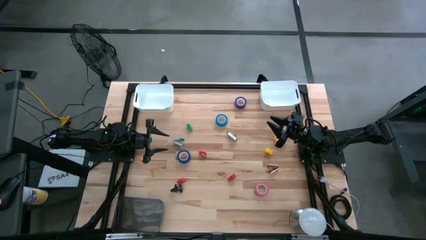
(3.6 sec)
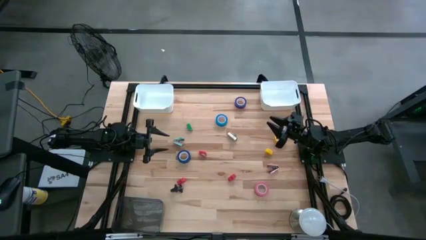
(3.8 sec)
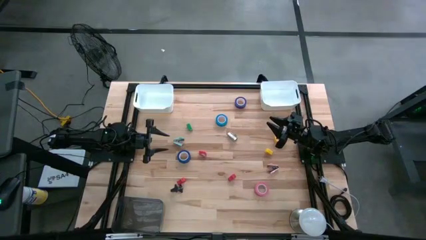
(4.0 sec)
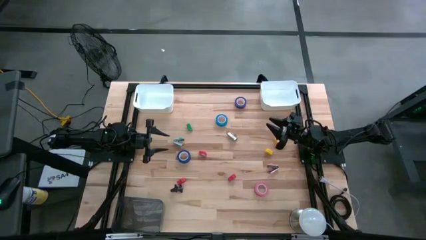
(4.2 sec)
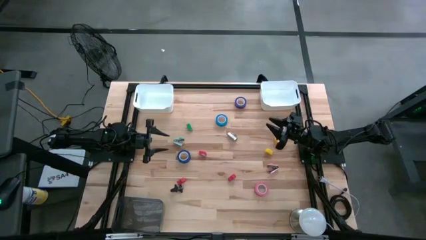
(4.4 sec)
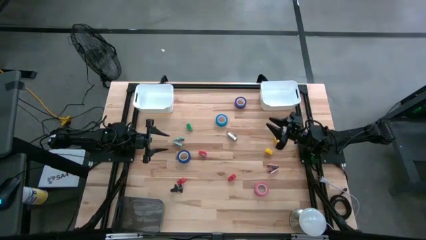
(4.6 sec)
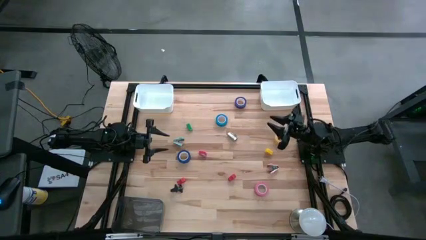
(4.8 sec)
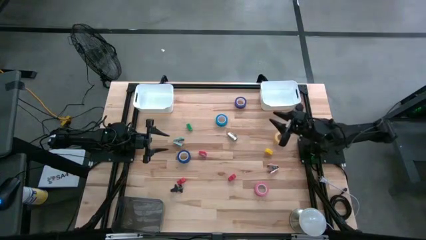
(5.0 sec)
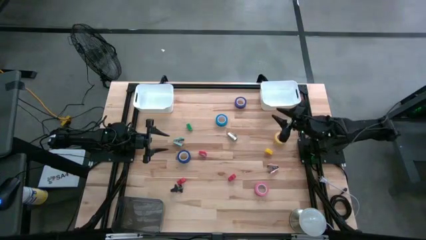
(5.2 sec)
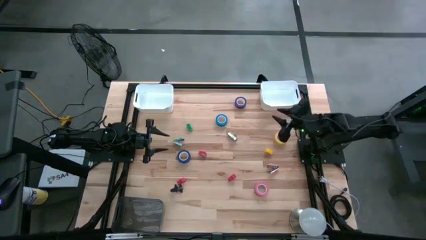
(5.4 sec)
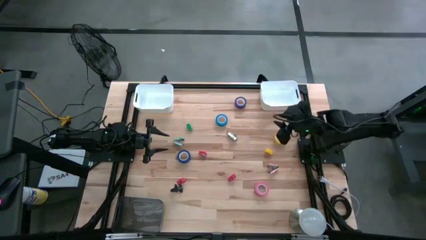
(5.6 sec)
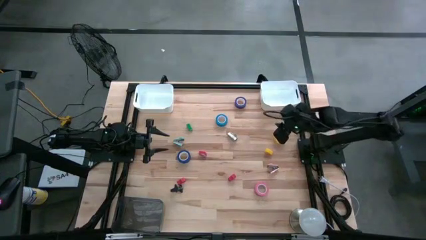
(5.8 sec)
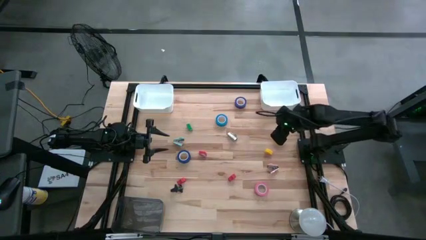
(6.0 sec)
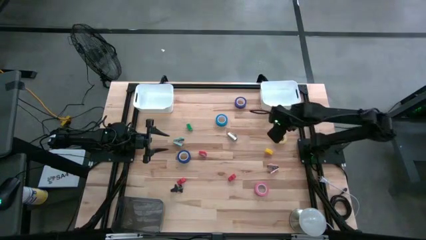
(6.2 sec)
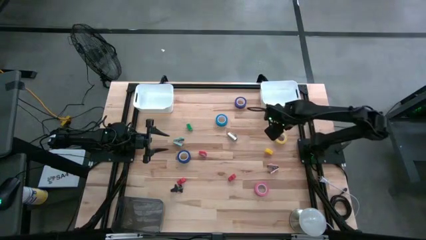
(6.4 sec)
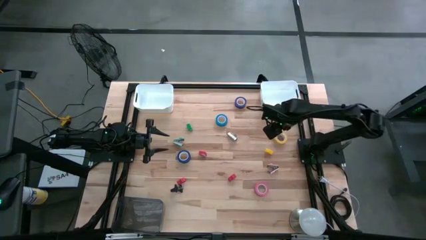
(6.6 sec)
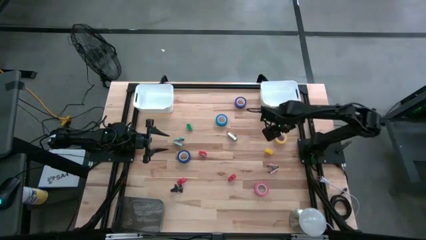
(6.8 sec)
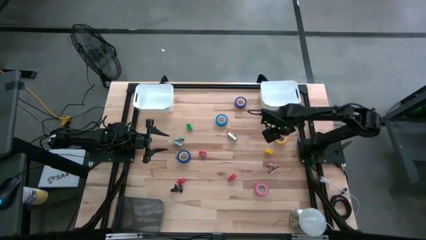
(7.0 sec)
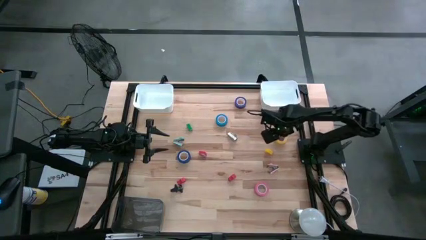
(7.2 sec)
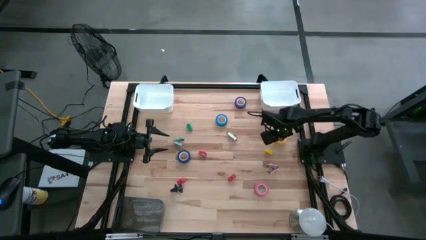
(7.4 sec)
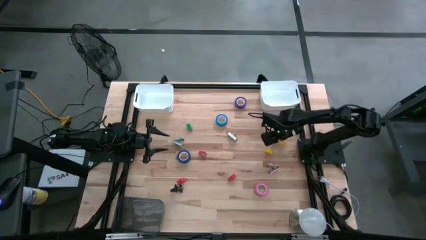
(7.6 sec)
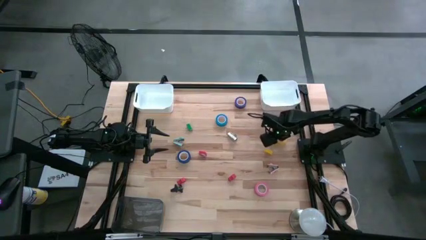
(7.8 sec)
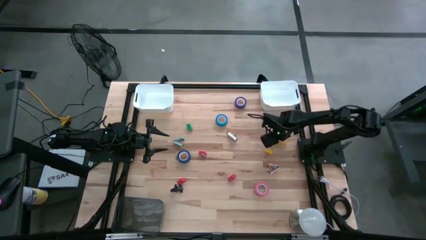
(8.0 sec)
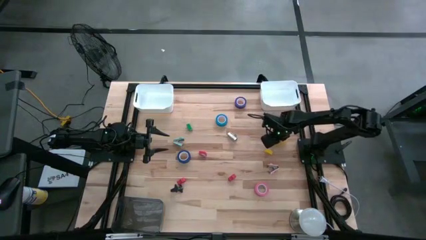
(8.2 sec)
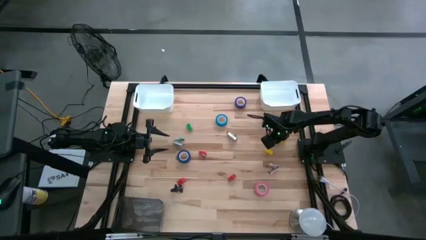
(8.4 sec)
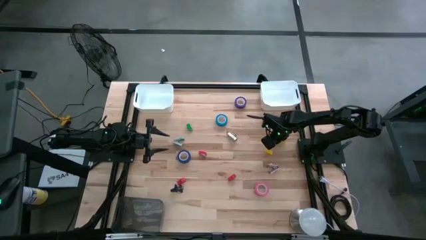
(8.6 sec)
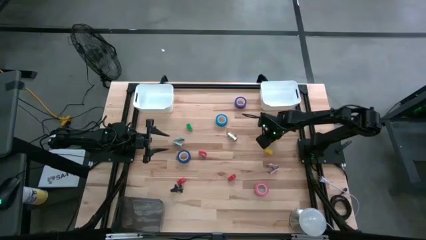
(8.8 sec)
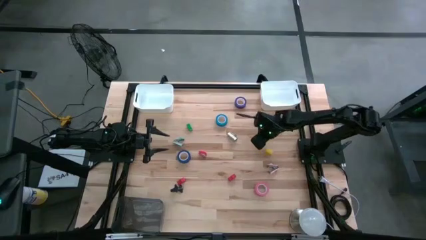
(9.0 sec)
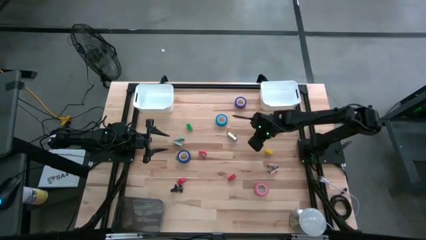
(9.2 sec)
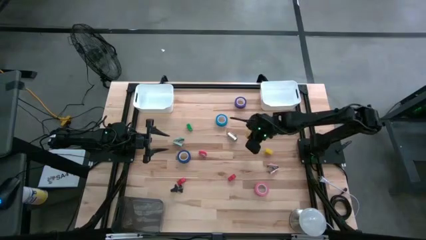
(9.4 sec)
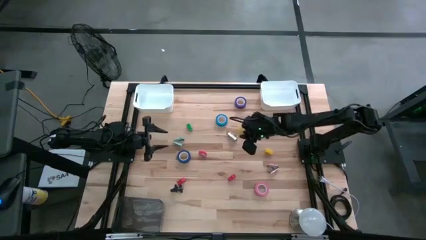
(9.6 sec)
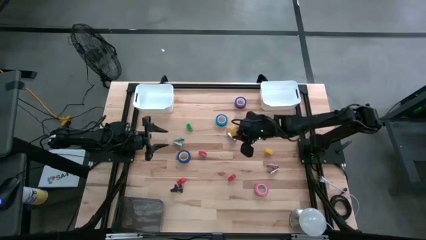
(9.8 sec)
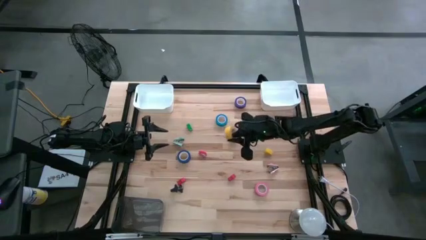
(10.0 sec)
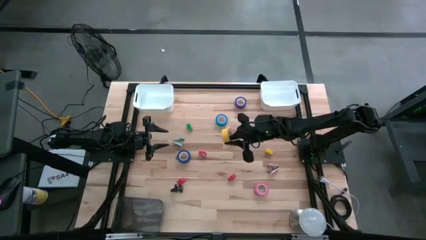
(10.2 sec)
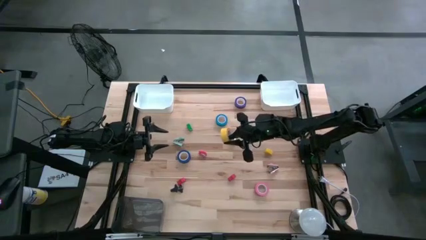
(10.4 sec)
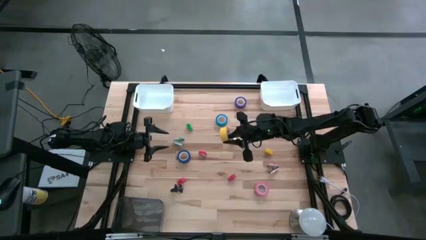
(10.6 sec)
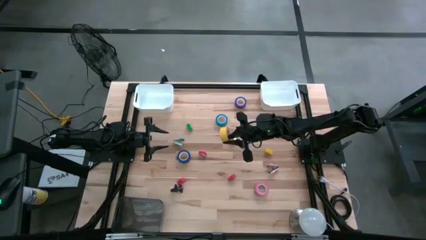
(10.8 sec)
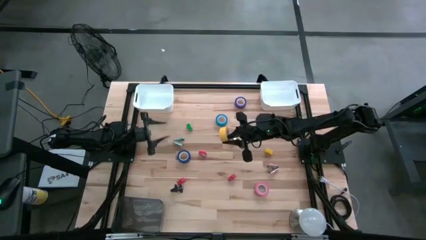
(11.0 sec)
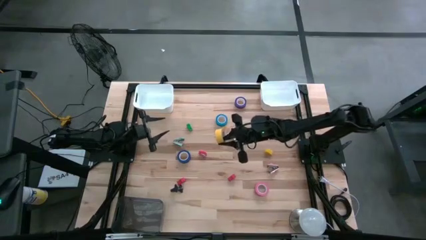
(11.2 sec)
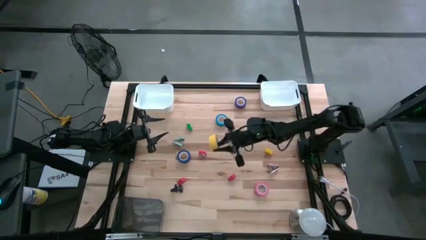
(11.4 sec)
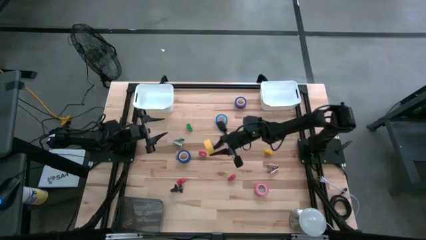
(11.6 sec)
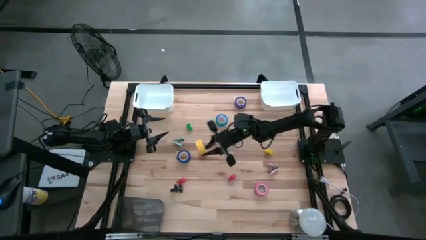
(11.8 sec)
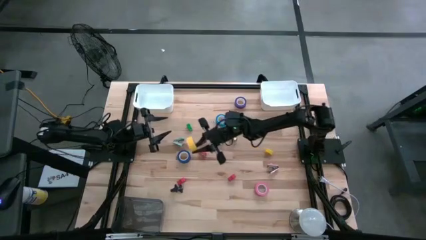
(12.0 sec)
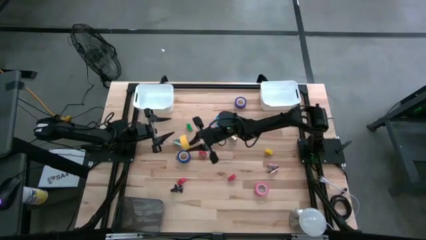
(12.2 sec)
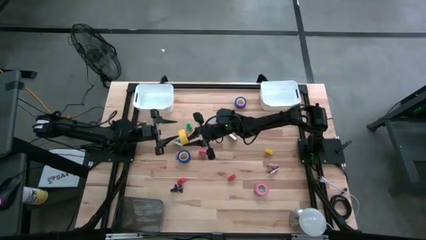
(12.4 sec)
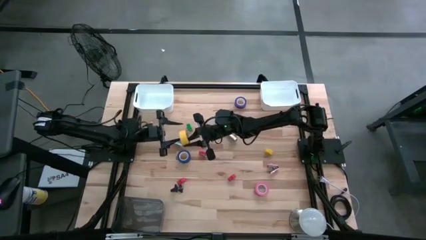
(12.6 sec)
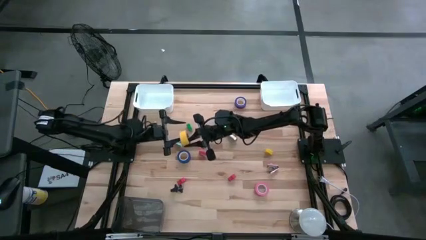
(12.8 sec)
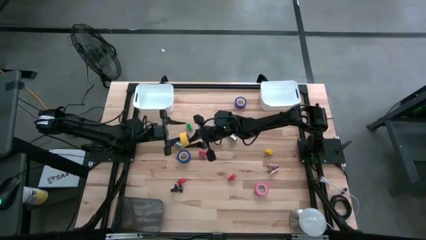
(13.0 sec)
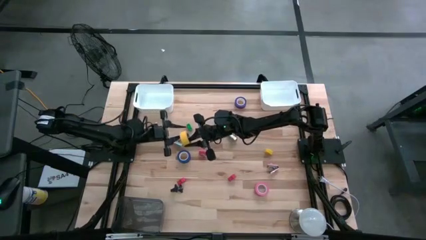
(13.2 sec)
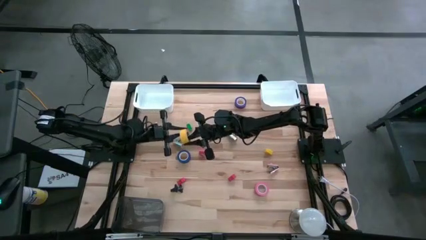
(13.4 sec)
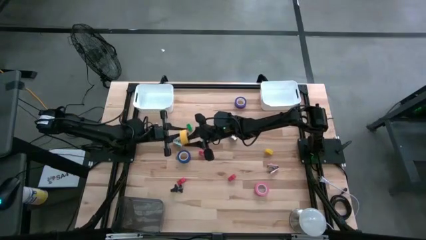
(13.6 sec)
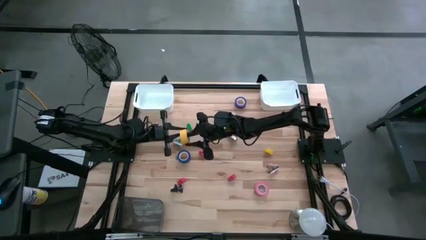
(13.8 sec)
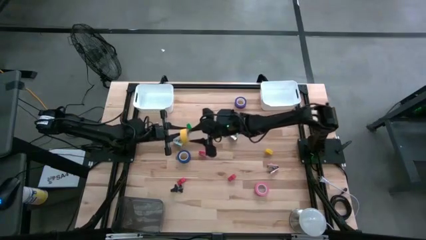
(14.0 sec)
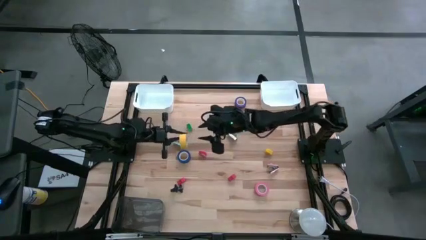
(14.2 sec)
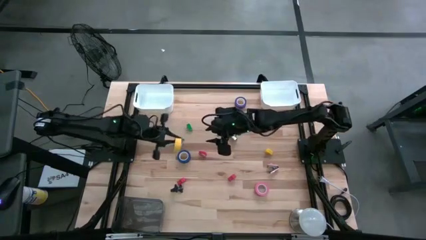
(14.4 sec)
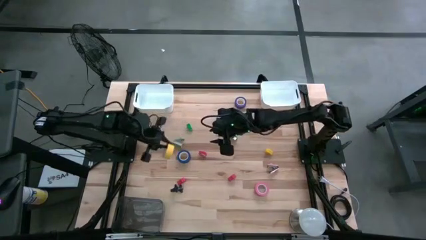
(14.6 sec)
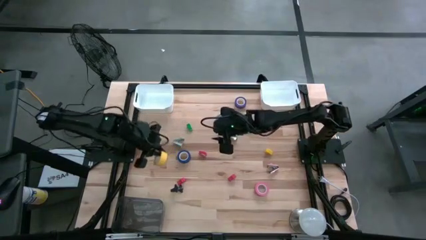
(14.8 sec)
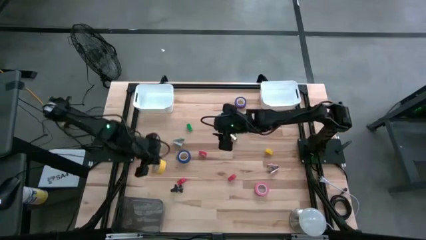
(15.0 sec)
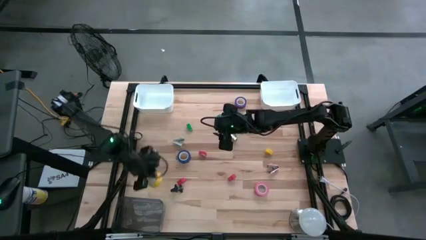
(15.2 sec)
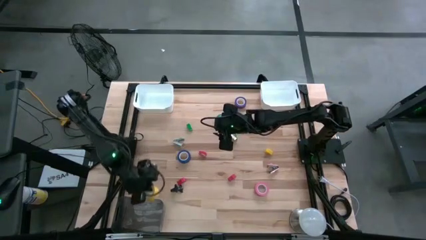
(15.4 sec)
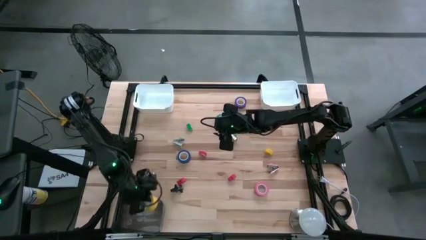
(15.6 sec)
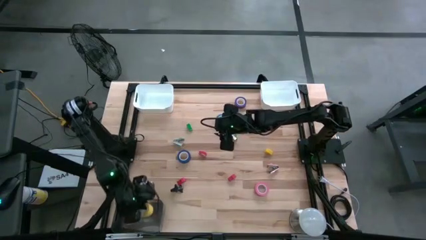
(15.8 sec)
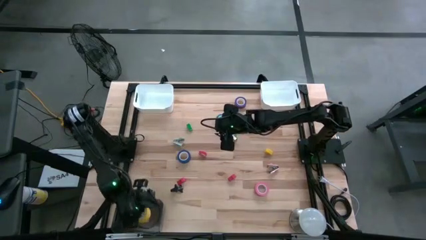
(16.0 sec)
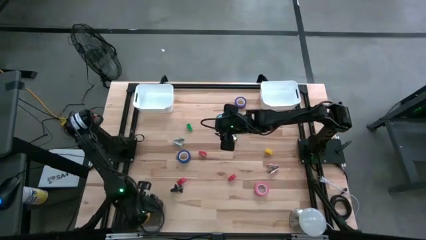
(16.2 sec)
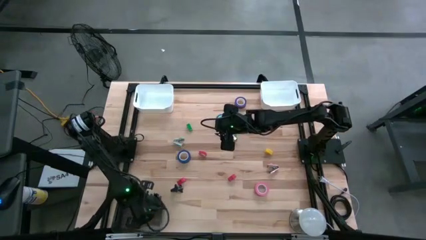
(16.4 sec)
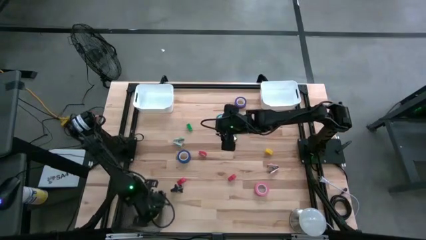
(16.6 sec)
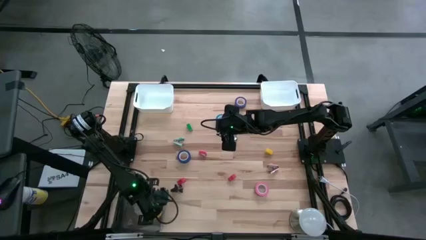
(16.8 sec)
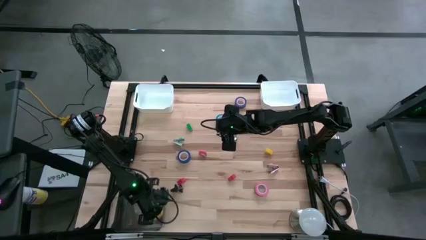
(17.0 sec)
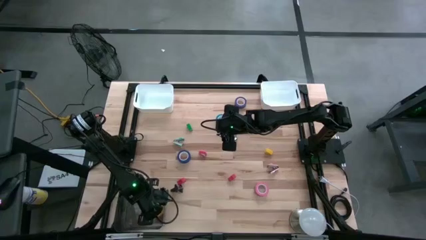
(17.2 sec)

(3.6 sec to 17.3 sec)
Task: Pick and place Stapler, Stapler remover, tape
Put the yellow tape into the black bin
